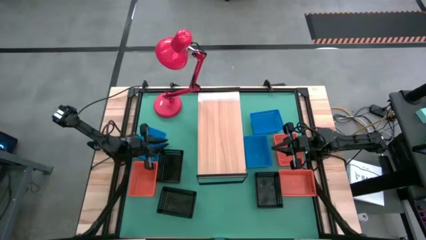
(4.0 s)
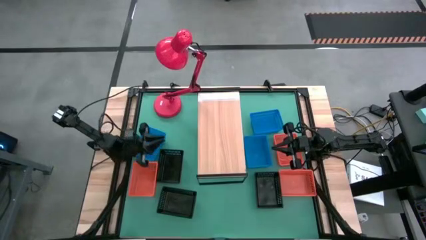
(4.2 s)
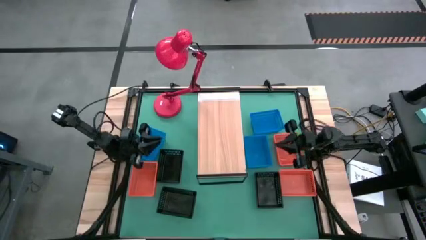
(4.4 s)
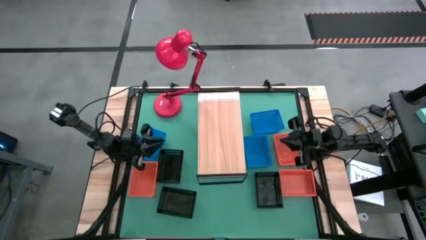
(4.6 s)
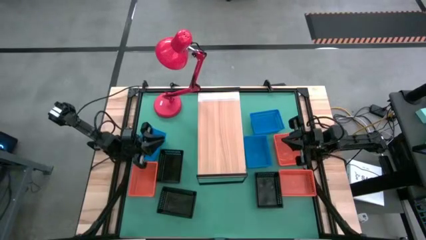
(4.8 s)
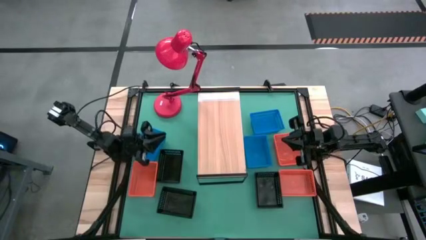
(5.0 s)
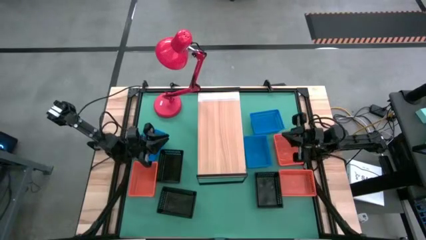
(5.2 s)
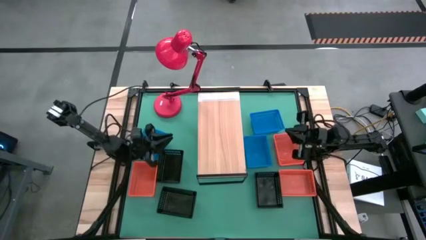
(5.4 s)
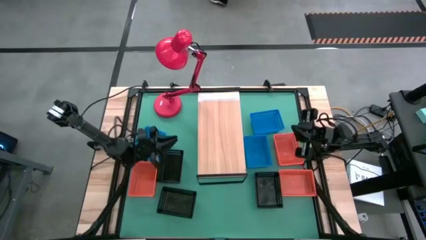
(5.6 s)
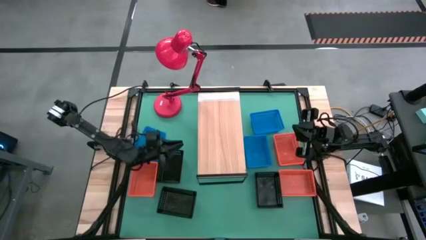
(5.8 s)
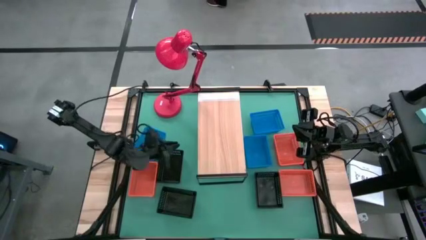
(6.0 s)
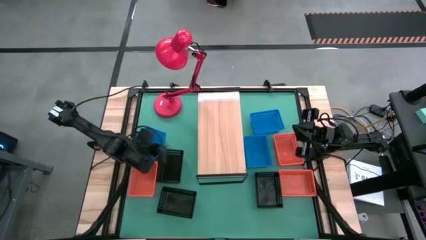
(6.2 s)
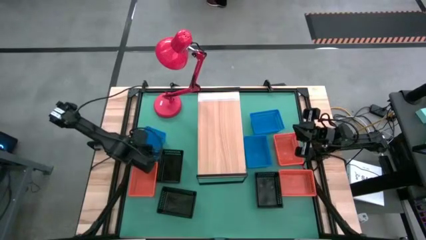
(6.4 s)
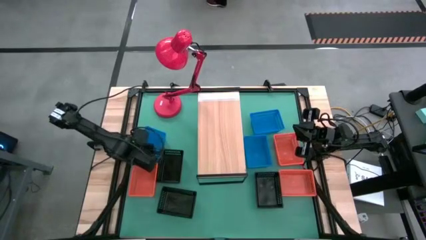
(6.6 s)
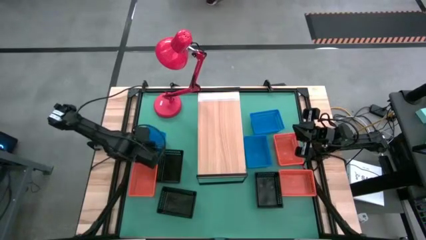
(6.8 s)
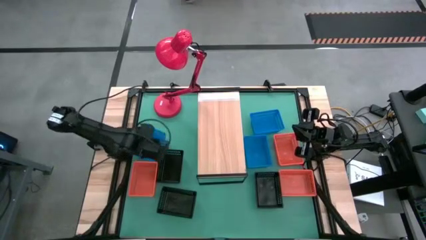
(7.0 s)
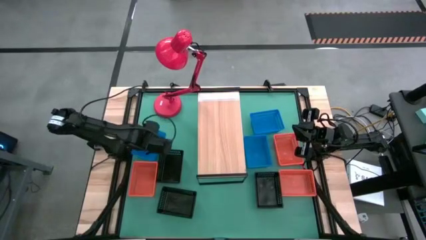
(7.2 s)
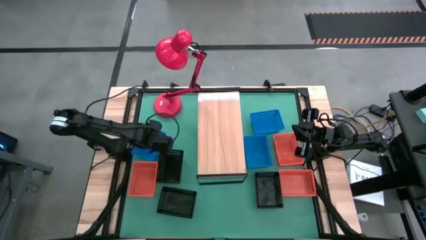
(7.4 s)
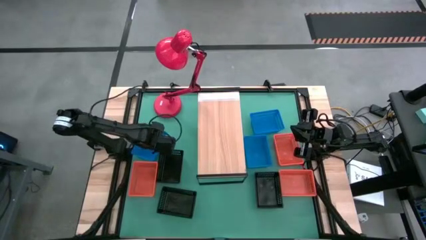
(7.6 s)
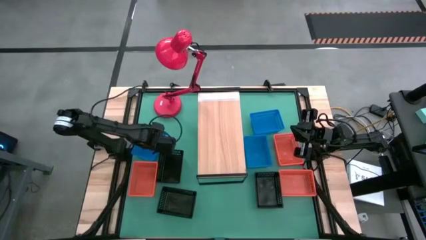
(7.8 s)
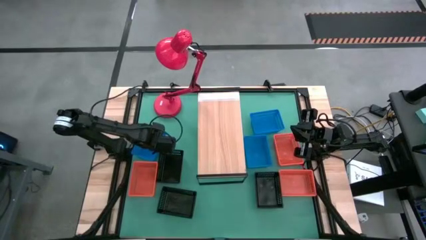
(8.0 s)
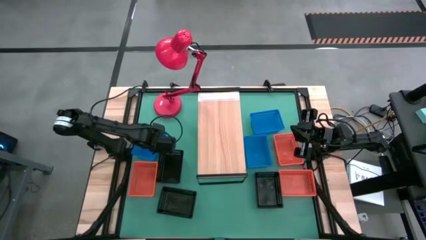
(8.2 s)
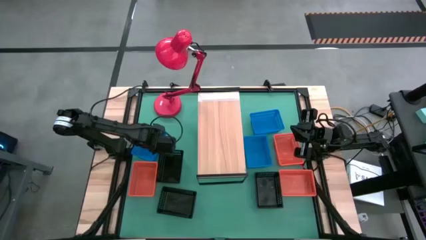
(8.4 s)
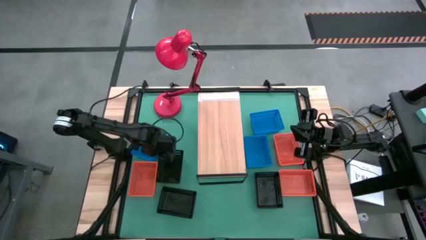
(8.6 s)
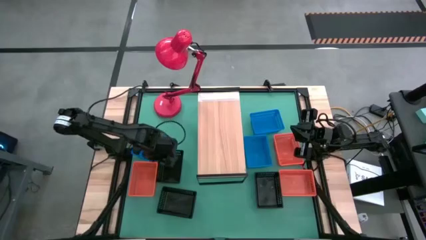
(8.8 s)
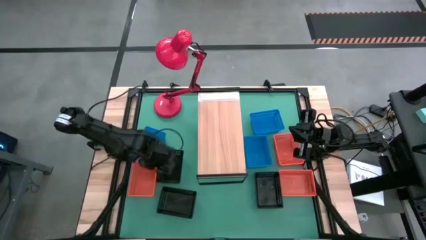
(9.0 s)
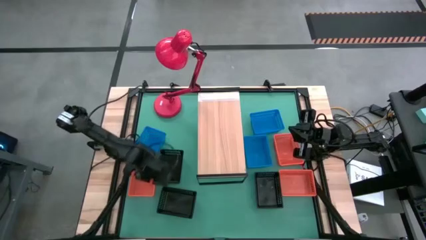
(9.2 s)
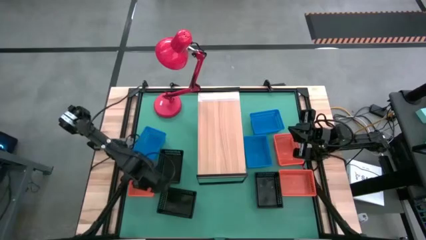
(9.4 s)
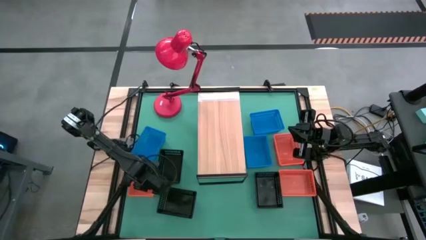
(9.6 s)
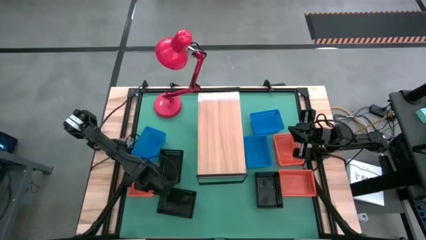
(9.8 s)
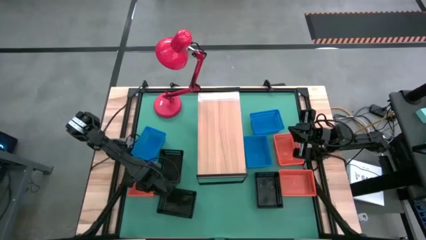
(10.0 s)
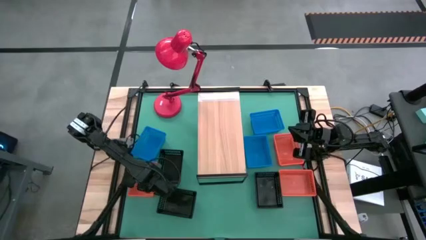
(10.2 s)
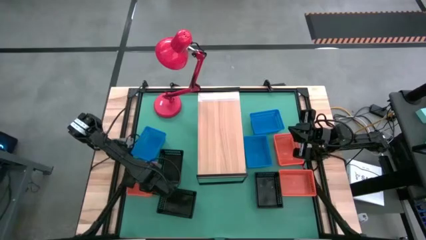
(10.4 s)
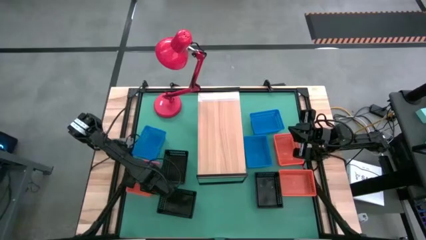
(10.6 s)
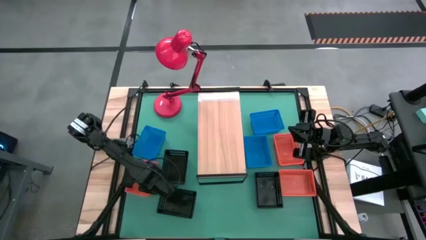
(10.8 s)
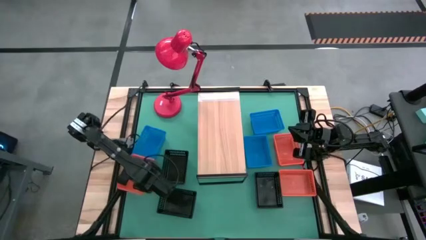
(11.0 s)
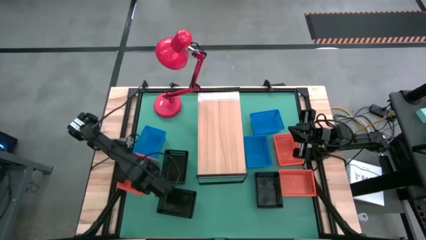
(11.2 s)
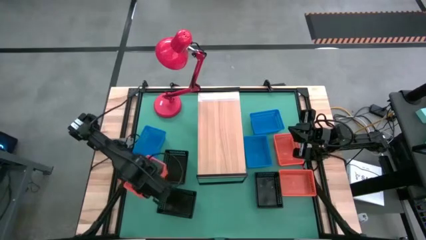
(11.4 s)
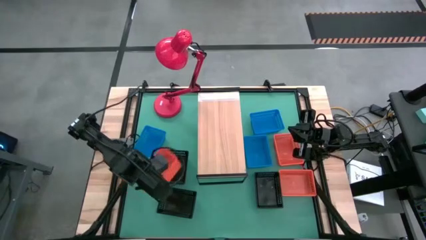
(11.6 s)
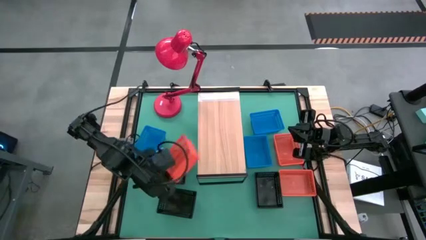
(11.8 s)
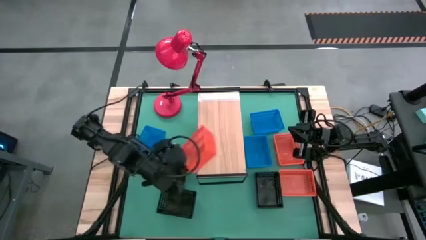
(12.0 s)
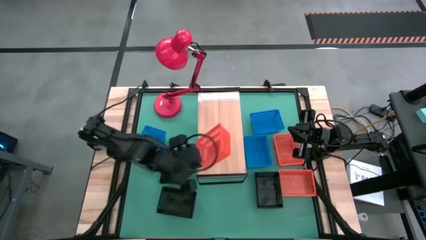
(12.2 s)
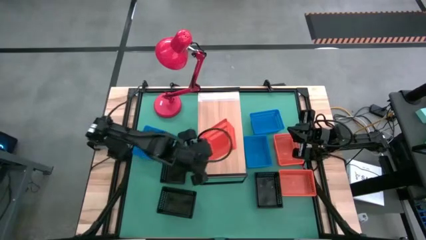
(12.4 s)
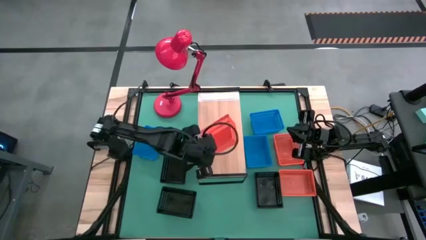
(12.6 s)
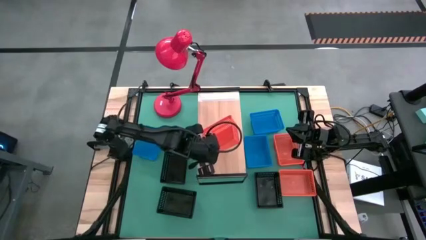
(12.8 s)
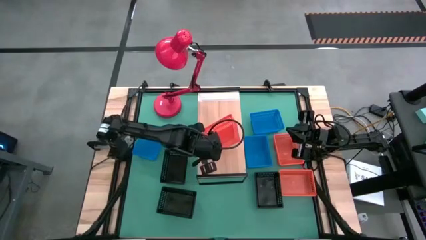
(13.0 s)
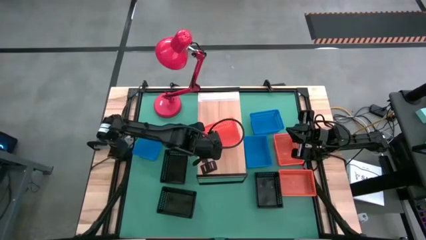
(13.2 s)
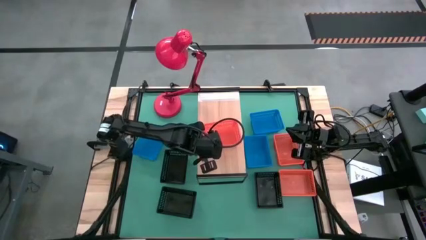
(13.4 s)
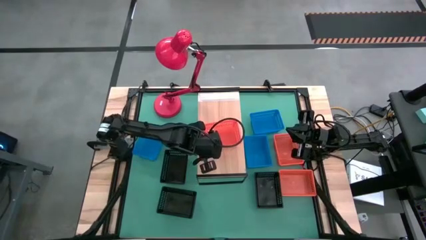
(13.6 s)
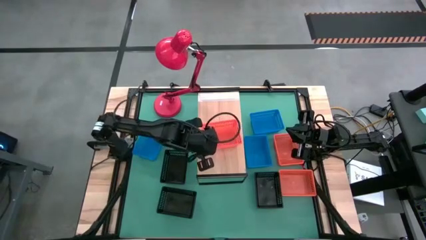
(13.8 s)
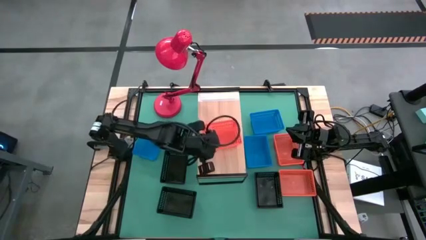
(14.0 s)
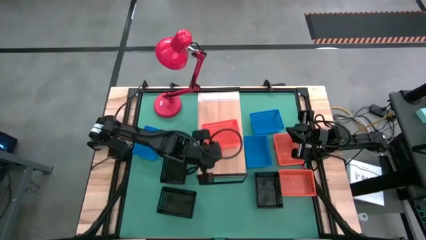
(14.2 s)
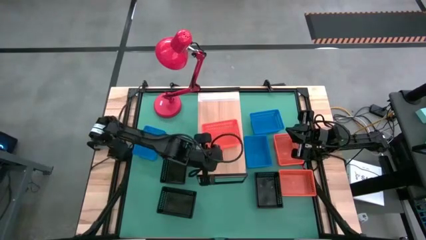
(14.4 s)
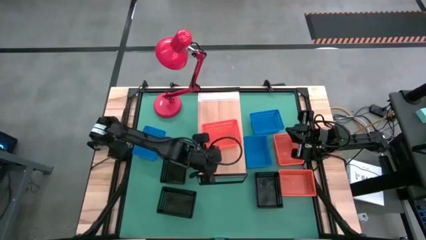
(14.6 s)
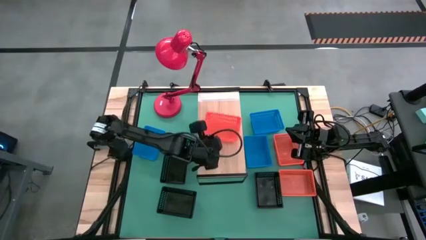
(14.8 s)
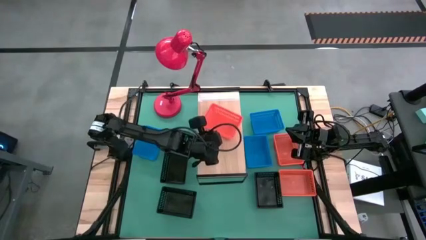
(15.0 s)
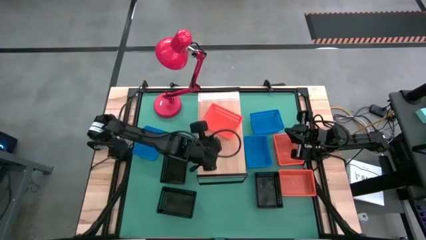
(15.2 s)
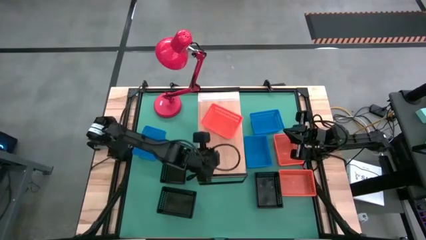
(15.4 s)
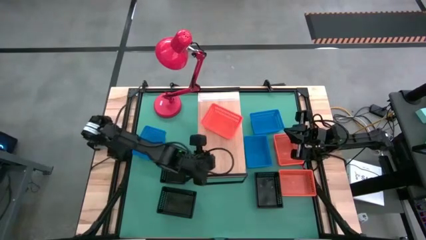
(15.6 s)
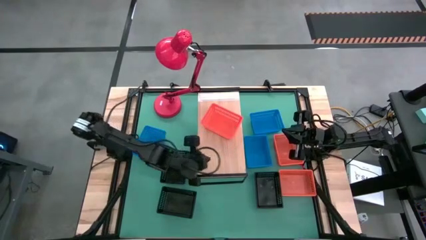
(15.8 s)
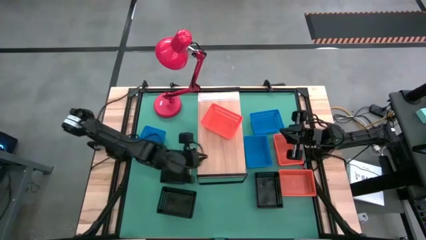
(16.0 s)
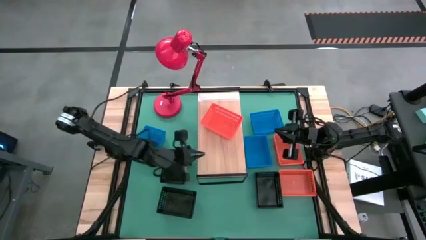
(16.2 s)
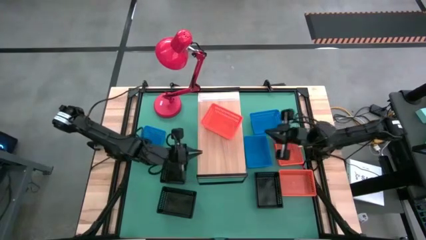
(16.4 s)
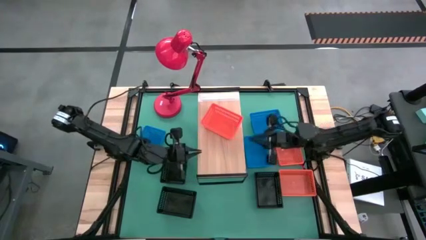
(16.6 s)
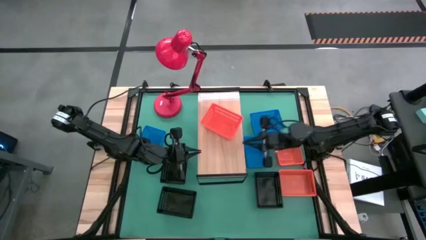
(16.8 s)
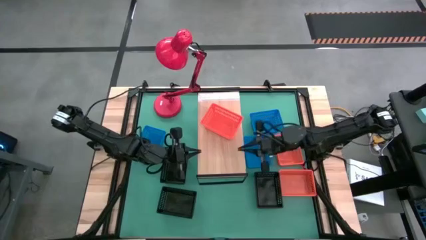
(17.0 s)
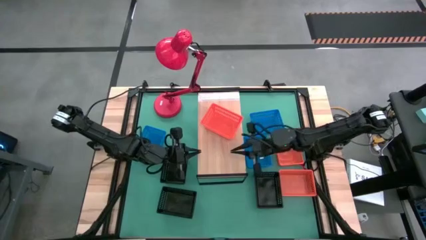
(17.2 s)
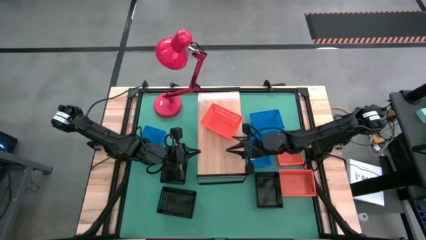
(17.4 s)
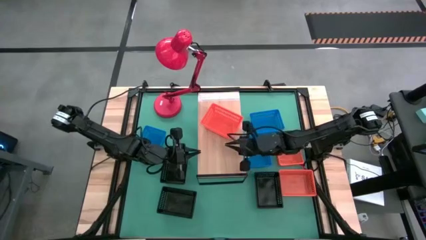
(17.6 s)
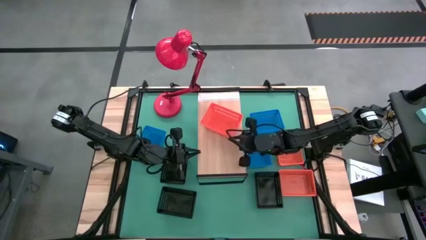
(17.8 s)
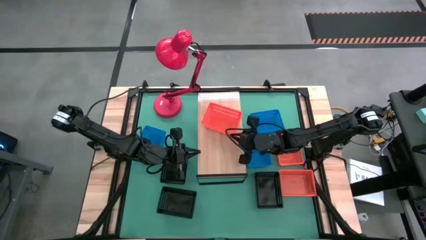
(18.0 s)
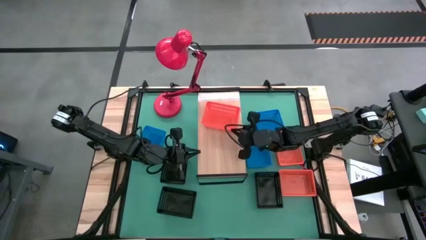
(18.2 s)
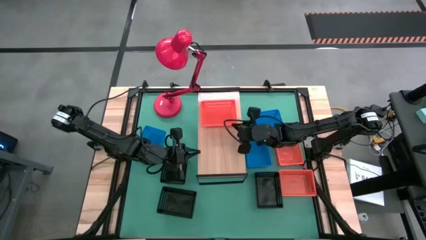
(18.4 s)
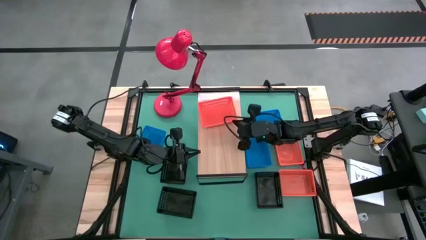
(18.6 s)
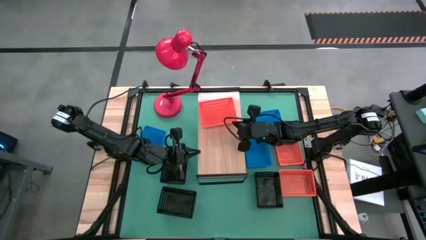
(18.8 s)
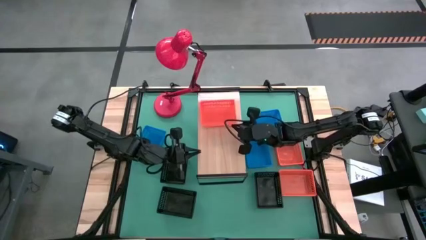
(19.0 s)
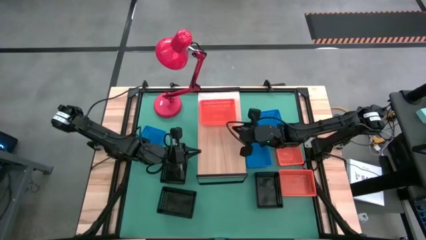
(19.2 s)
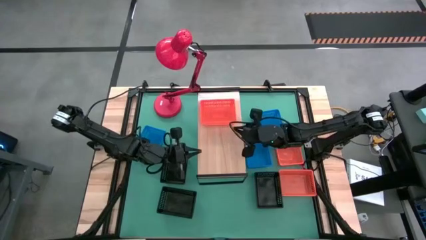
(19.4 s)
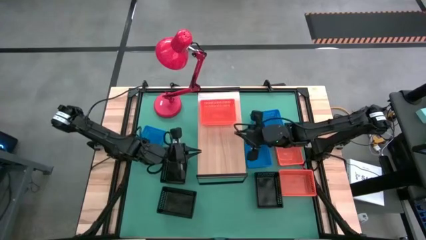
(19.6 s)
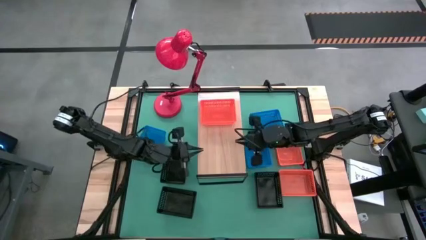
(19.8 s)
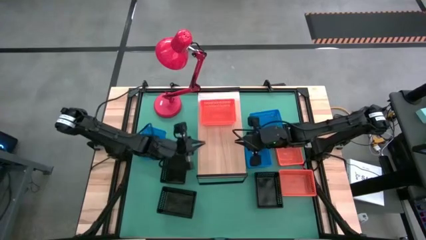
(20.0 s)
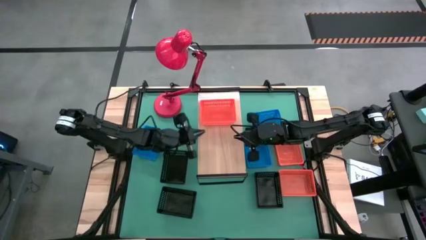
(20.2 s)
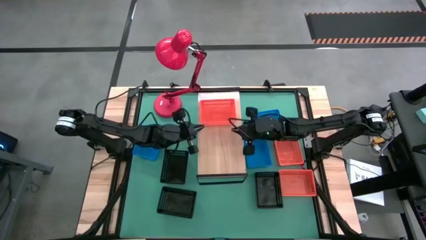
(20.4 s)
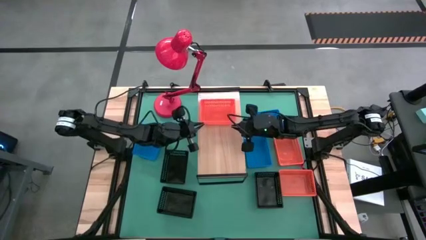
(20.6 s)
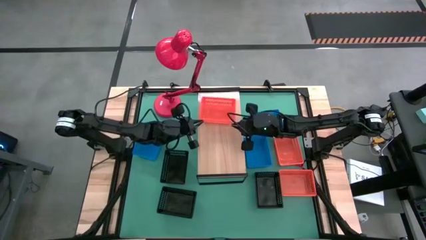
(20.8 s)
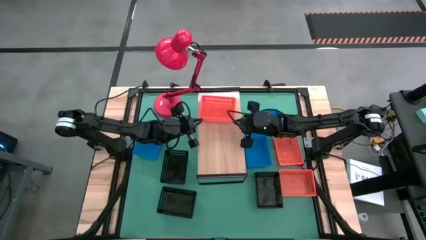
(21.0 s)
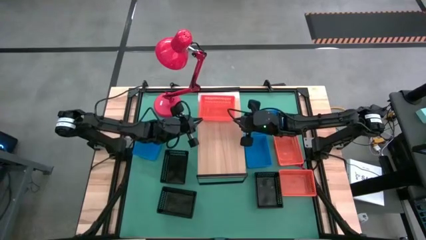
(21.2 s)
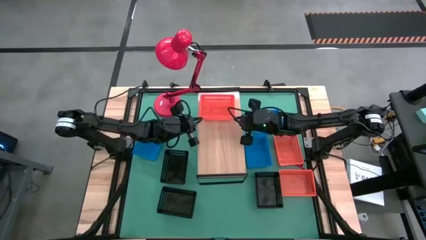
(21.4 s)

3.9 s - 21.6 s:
Task: Stack baskets on shelf by color
Put the left orange bin on the shelf
